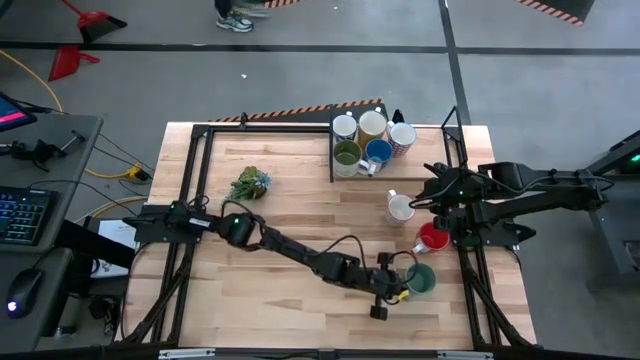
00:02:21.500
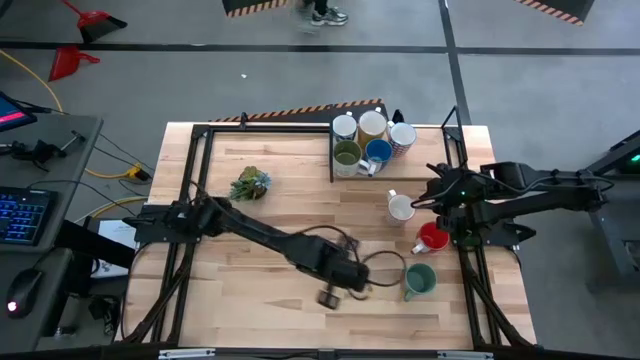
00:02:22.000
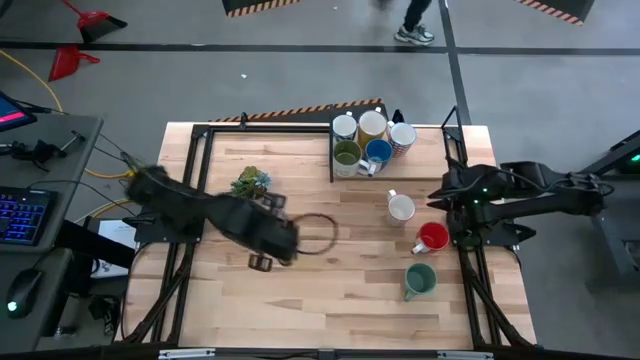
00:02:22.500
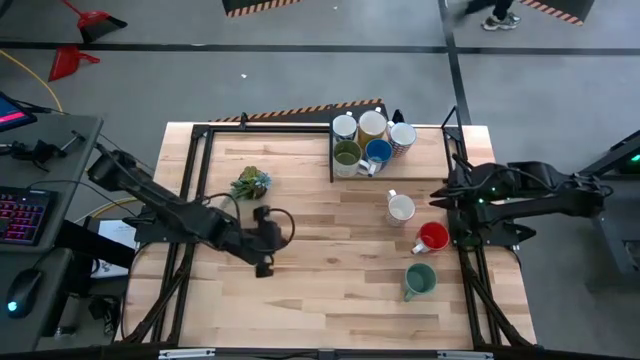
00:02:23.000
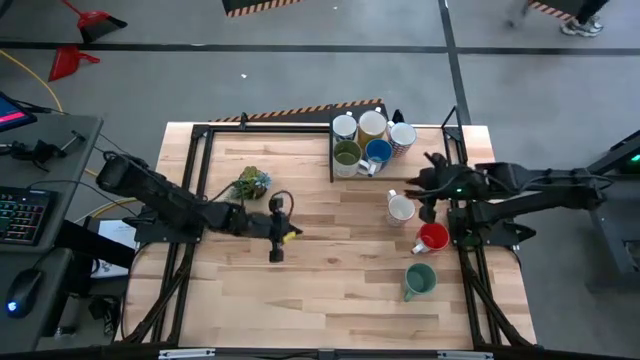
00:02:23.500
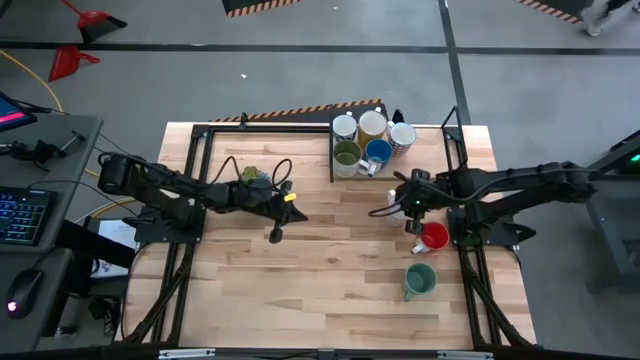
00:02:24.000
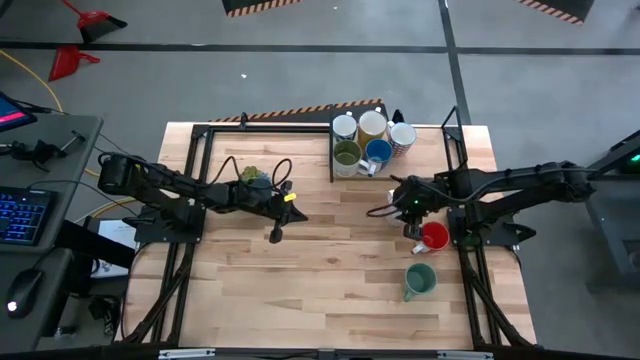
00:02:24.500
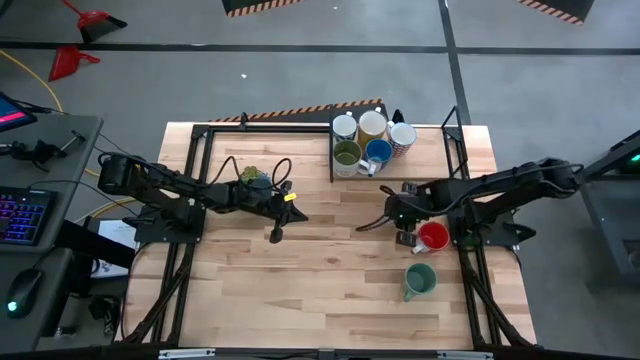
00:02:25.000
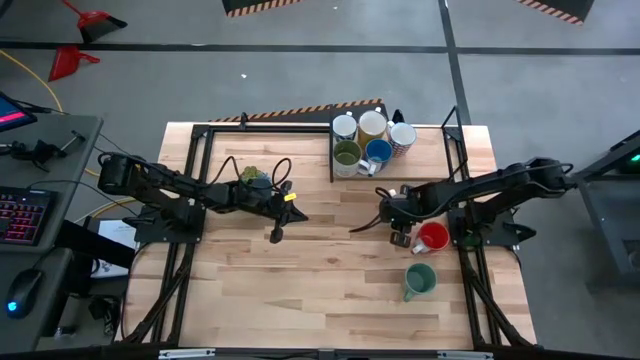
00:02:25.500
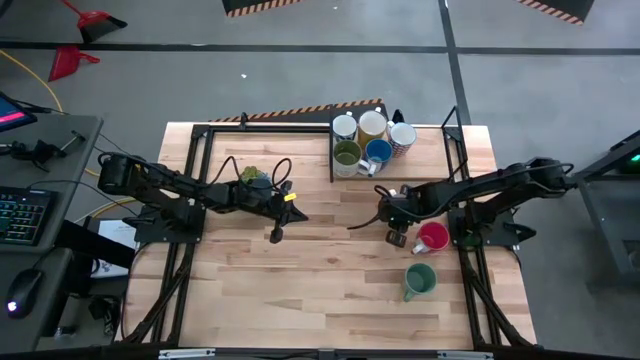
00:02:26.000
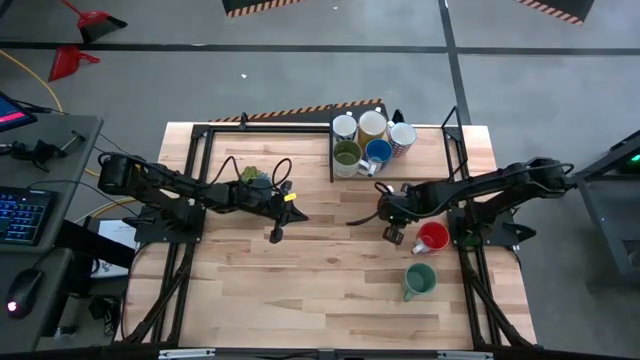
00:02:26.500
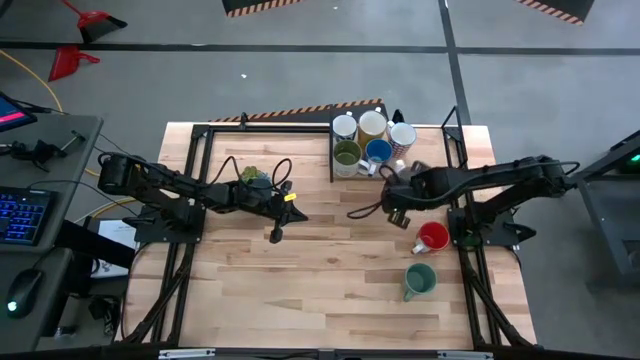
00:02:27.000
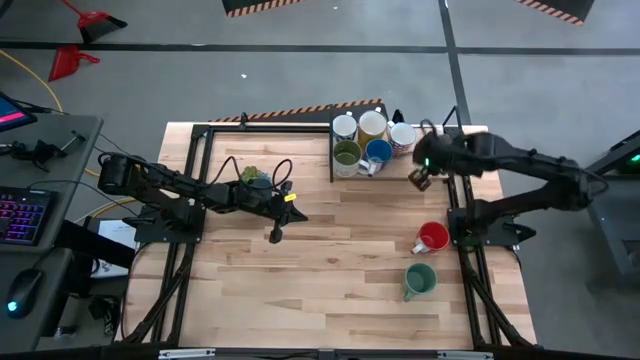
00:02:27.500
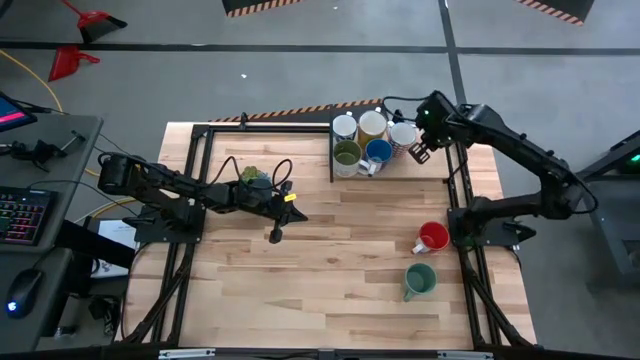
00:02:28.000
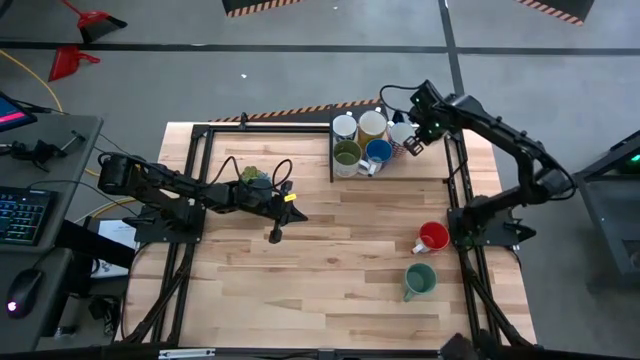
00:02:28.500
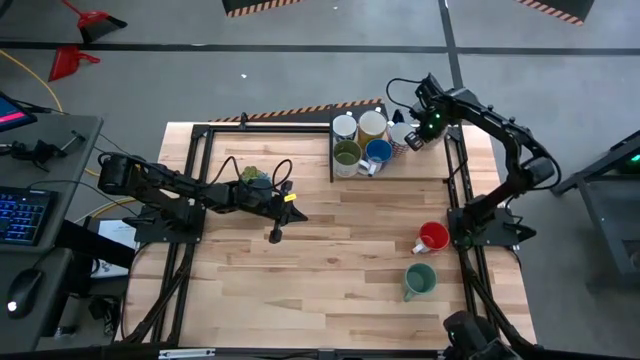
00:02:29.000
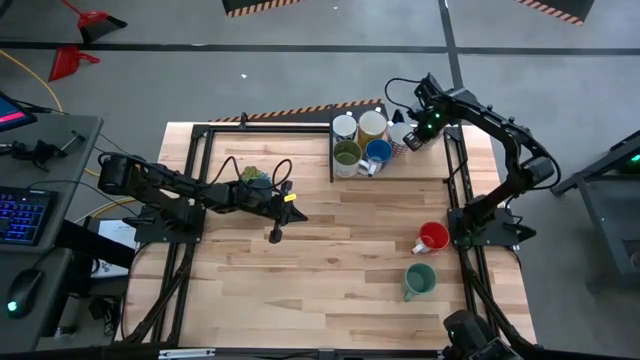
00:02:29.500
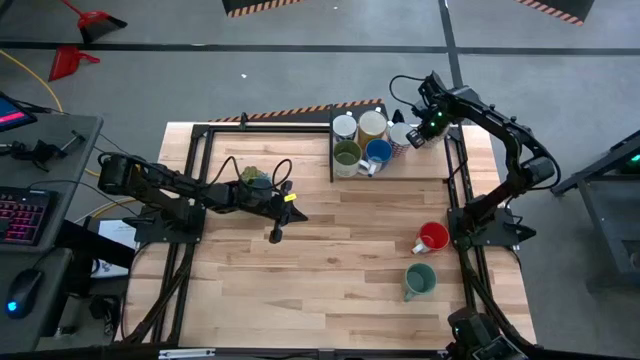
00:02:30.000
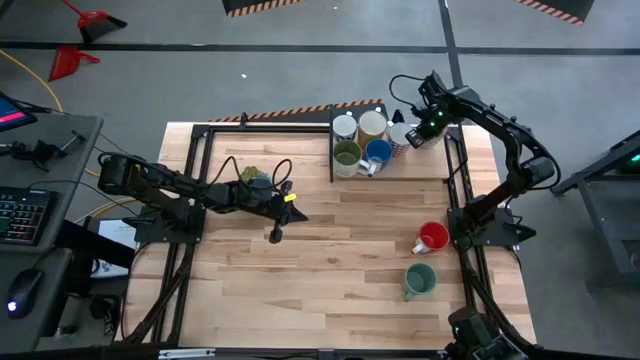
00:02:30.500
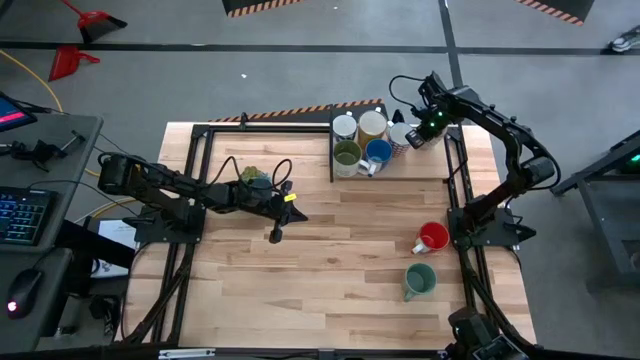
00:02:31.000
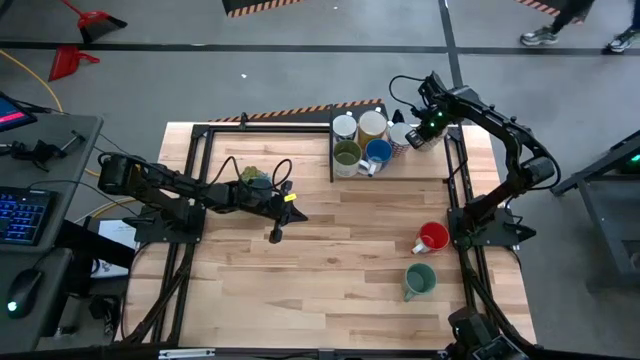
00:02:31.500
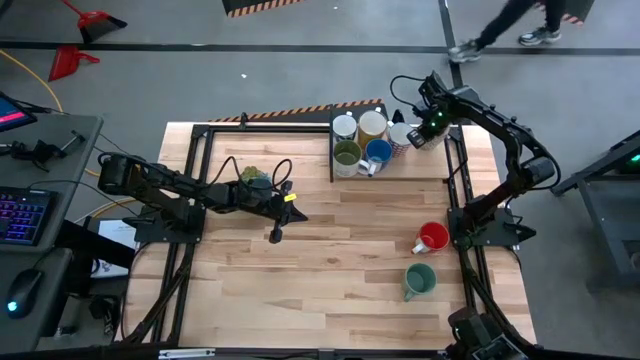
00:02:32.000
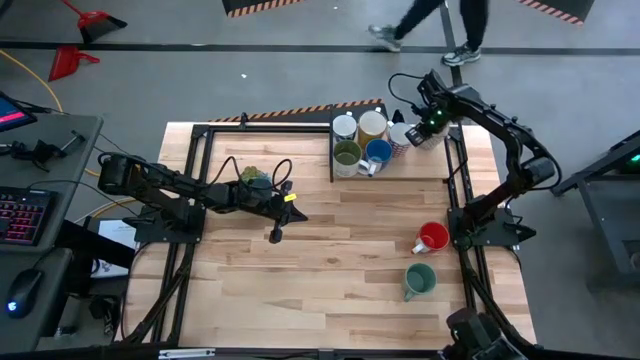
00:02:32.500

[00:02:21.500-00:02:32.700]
Task: Place coffee mugs
Put the white gray mug on the shelf

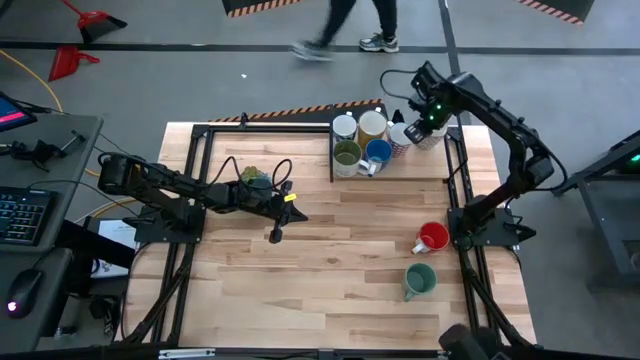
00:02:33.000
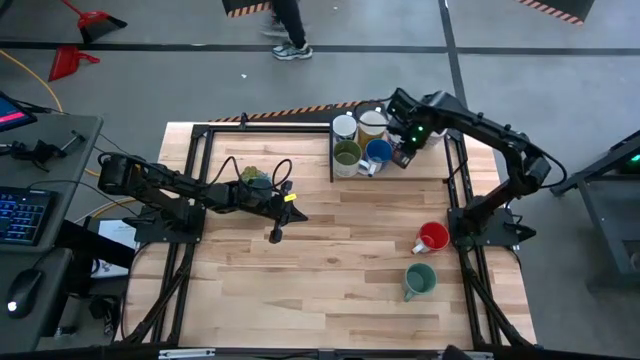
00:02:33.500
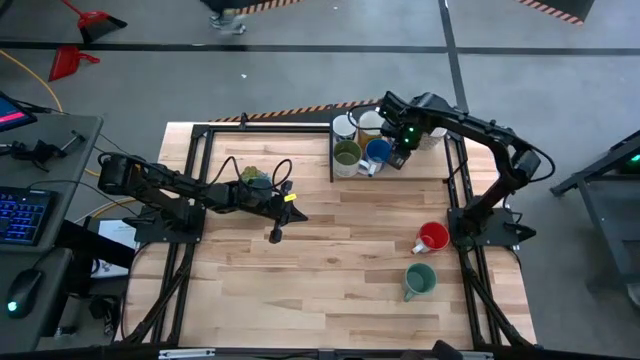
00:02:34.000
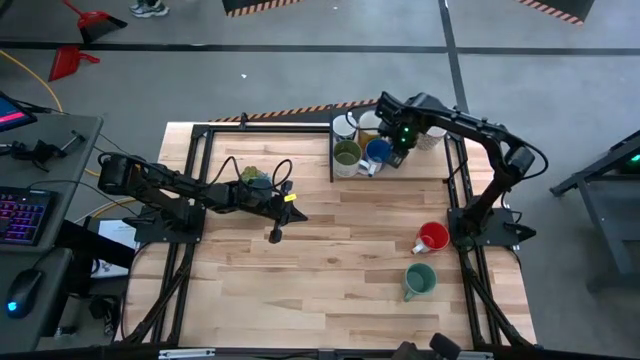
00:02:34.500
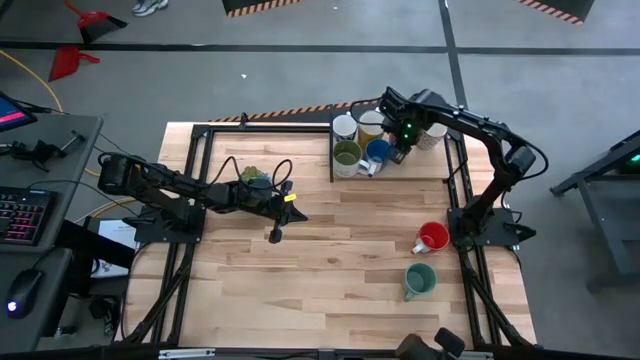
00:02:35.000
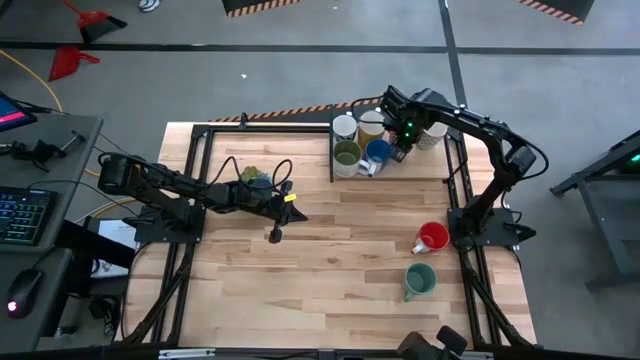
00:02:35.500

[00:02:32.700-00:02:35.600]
Adjust the red white mug on the shelf

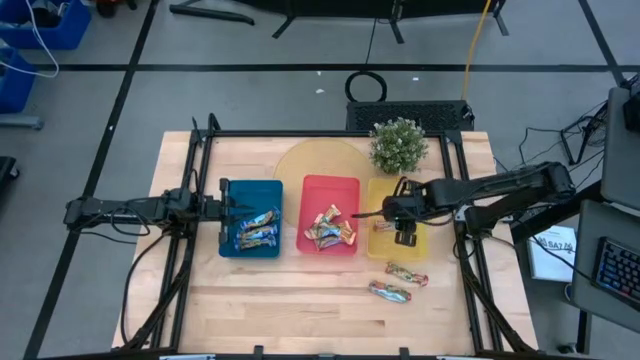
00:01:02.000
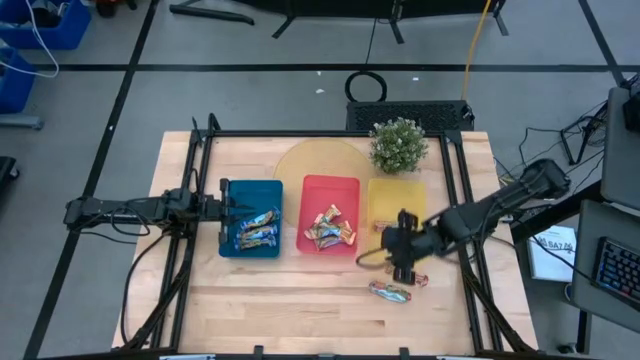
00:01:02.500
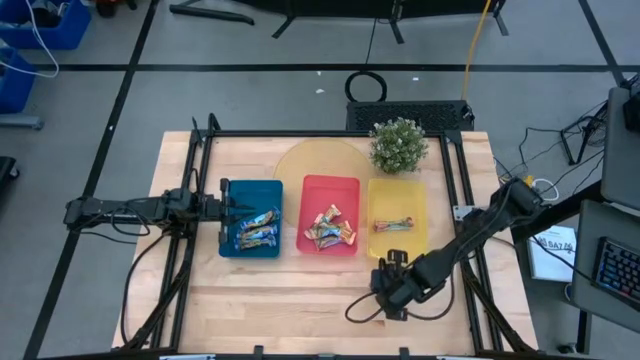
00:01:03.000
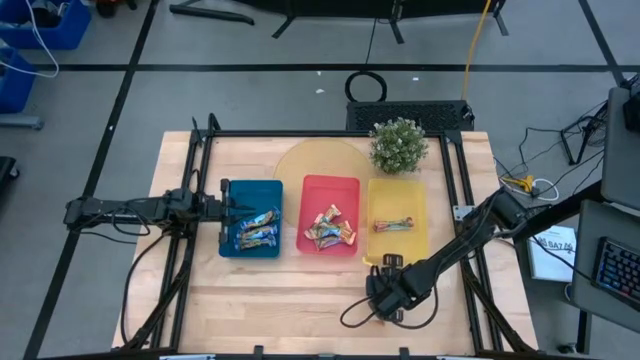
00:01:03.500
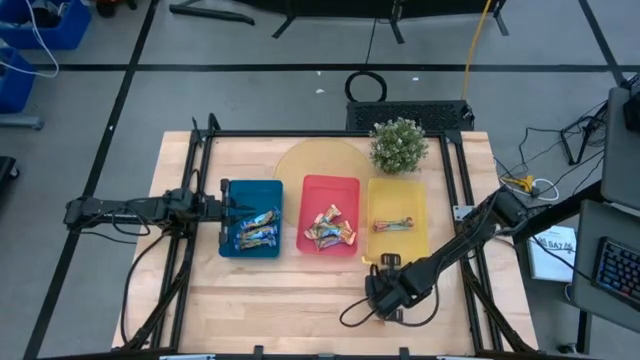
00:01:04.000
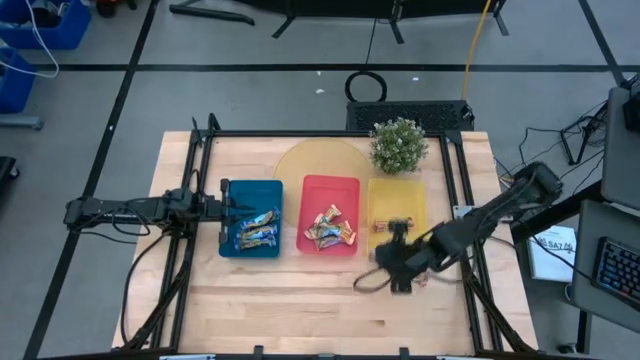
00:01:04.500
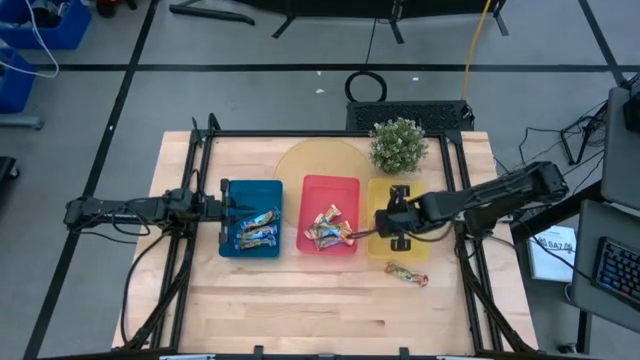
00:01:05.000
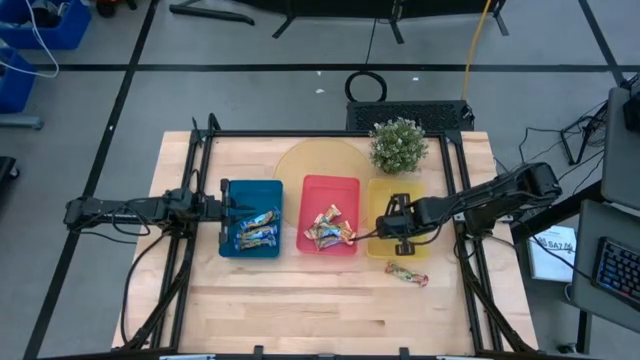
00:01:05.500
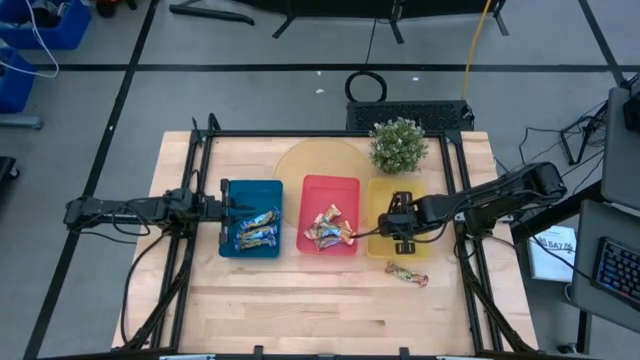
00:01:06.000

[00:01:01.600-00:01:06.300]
Task: Pick and place Granola Bars by type
Put the red granola bar into the yellow bin

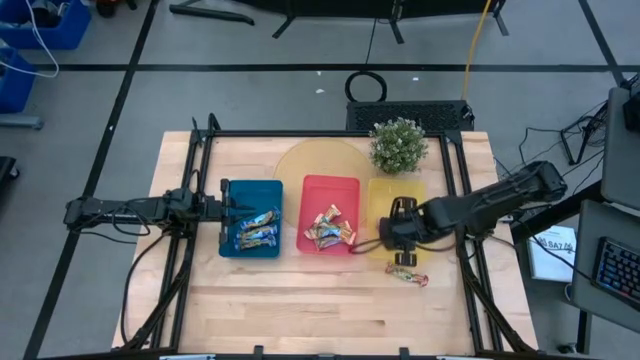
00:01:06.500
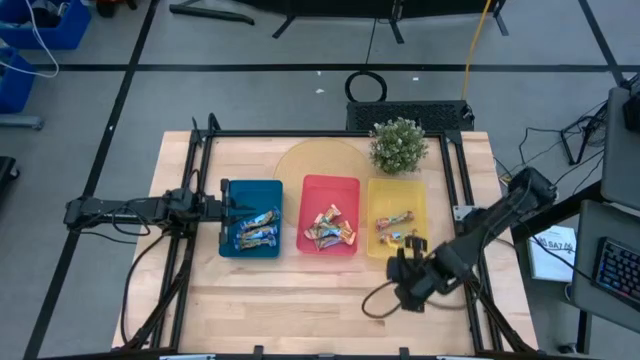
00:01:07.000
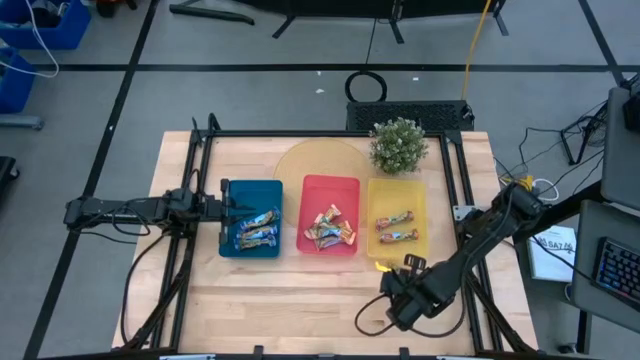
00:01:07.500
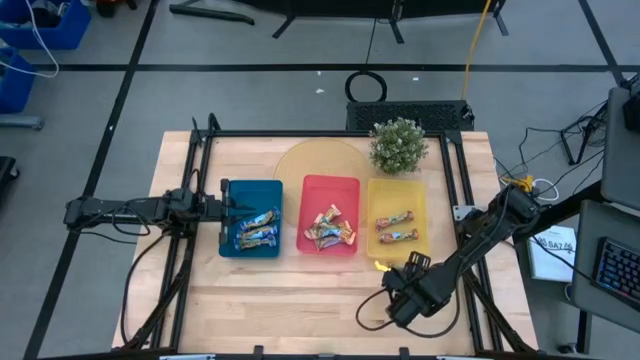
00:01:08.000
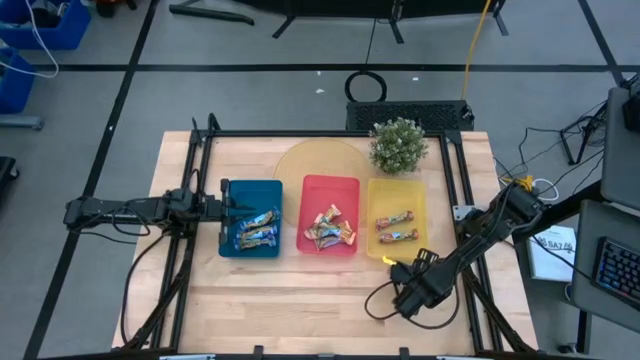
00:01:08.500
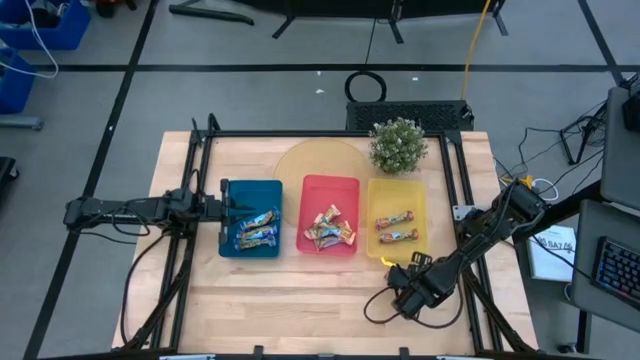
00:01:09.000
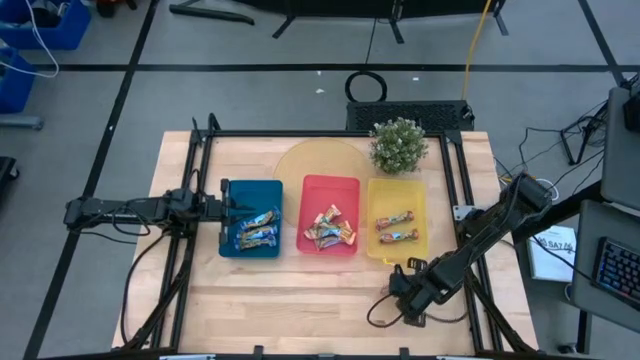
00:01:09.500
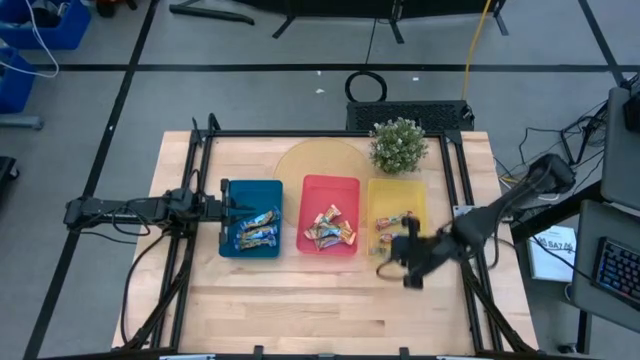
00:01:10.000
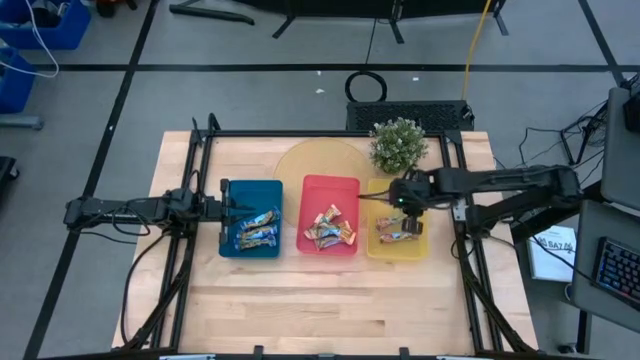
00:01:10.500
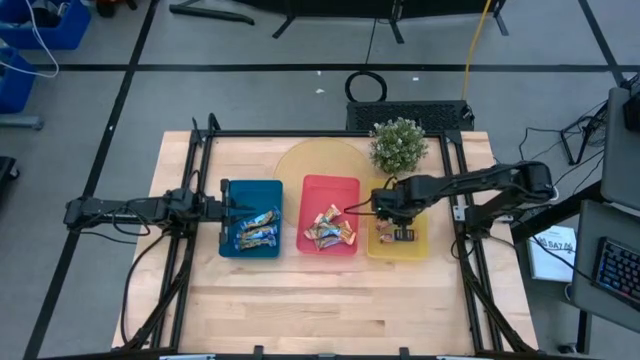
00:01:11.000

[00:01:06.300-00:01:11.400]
Put the red granola bar into the yellow bin
